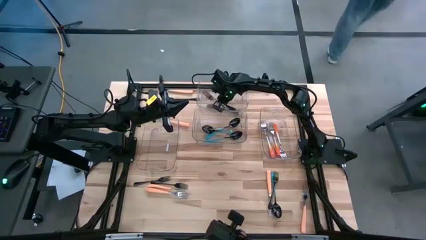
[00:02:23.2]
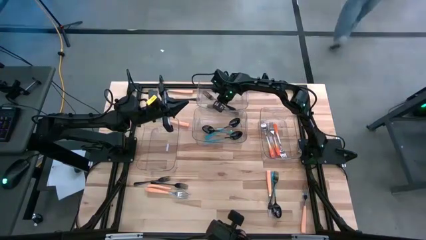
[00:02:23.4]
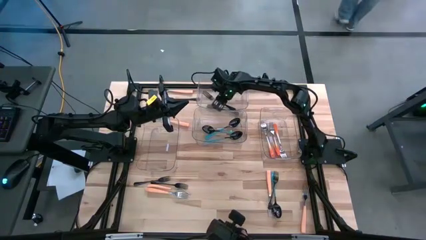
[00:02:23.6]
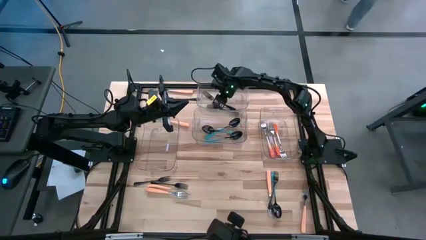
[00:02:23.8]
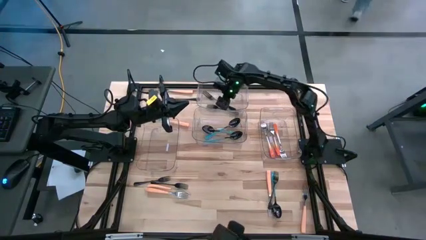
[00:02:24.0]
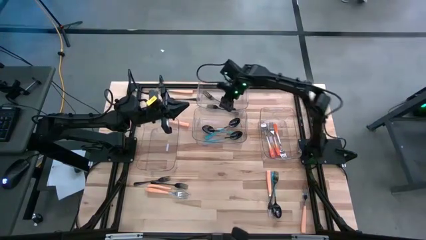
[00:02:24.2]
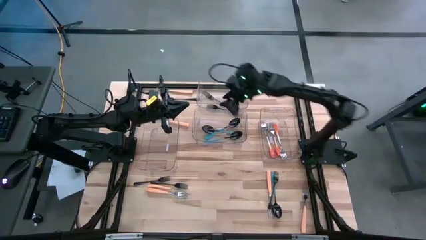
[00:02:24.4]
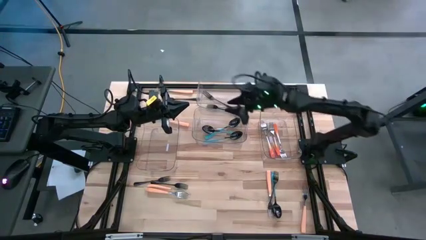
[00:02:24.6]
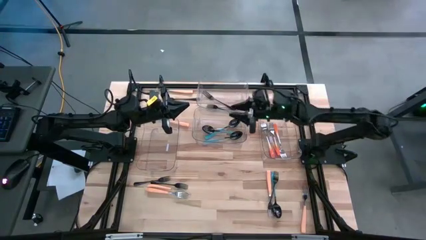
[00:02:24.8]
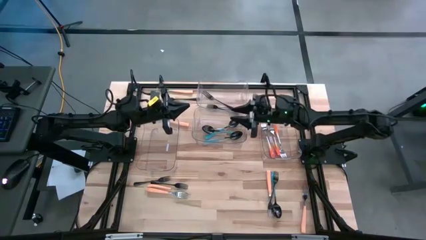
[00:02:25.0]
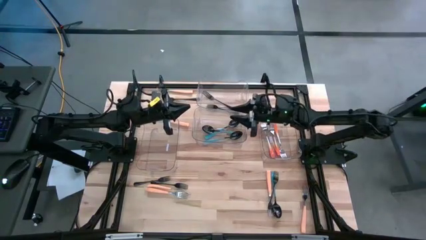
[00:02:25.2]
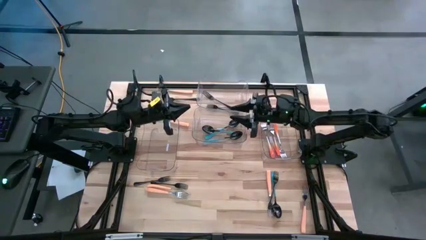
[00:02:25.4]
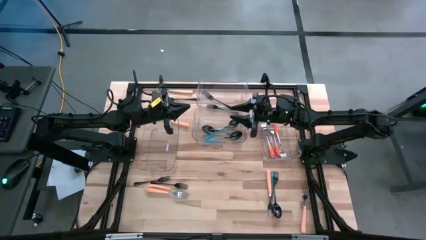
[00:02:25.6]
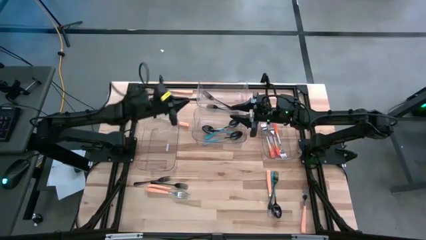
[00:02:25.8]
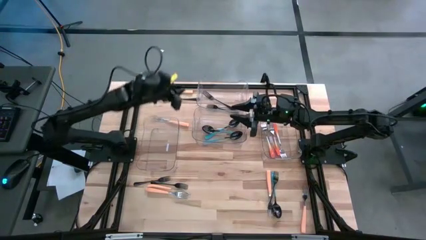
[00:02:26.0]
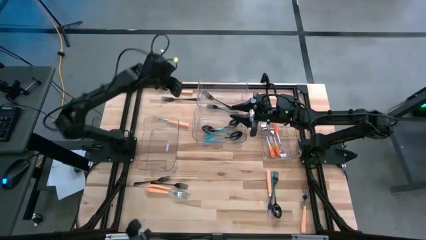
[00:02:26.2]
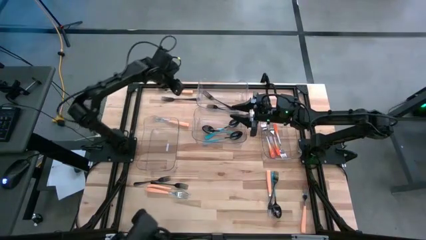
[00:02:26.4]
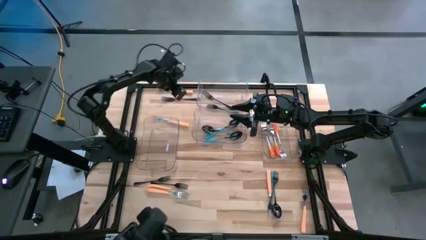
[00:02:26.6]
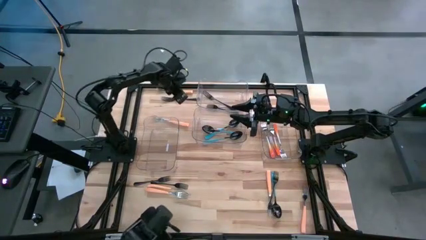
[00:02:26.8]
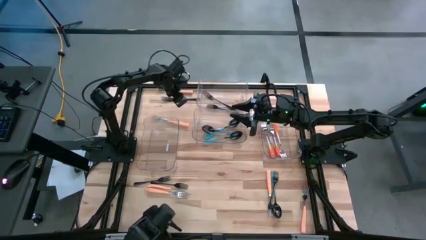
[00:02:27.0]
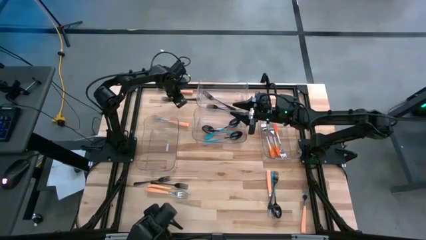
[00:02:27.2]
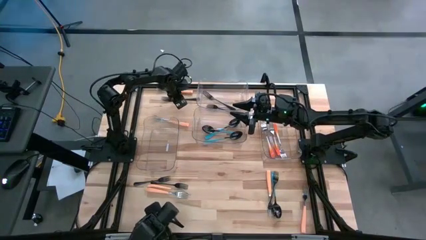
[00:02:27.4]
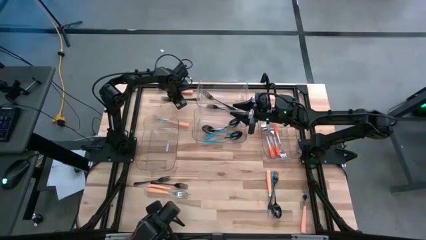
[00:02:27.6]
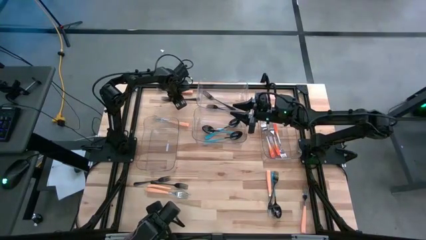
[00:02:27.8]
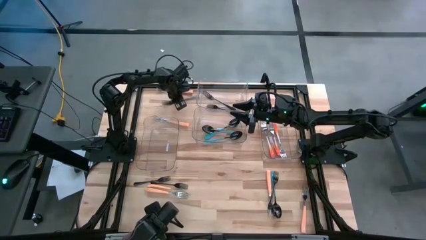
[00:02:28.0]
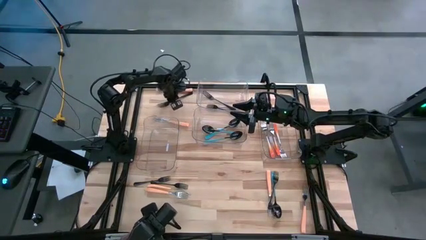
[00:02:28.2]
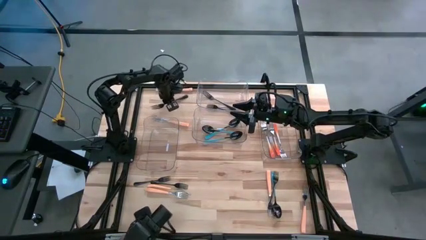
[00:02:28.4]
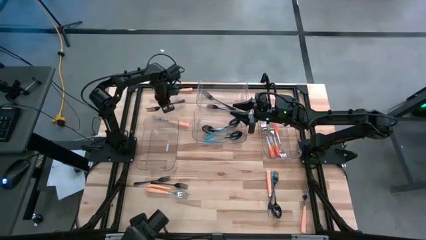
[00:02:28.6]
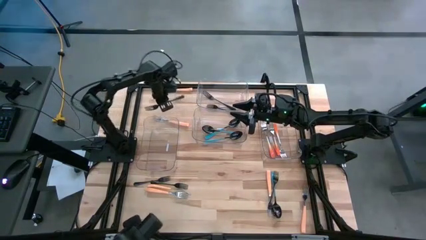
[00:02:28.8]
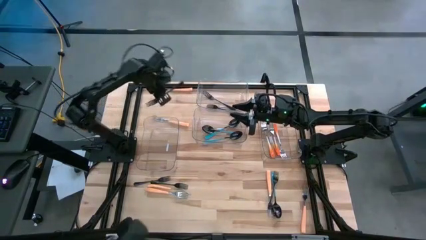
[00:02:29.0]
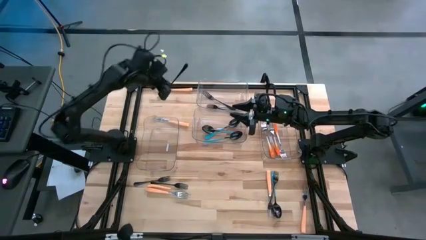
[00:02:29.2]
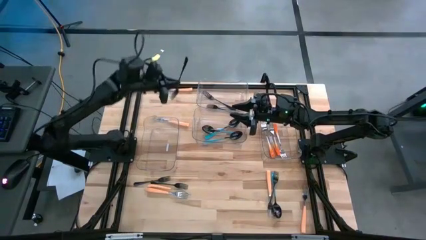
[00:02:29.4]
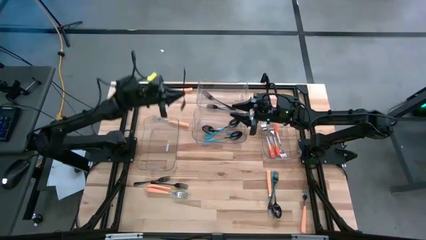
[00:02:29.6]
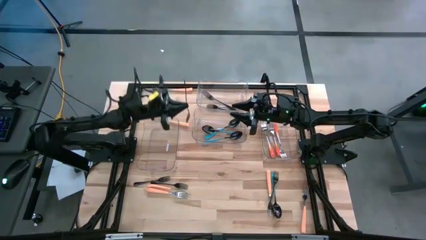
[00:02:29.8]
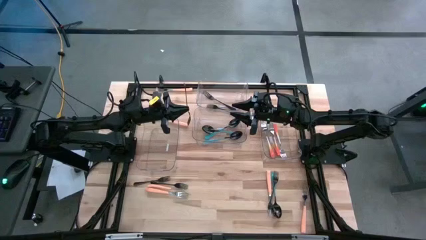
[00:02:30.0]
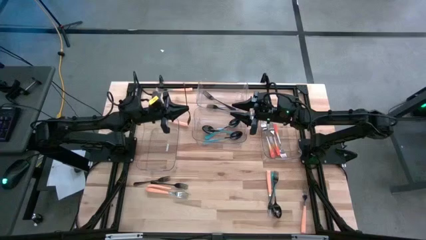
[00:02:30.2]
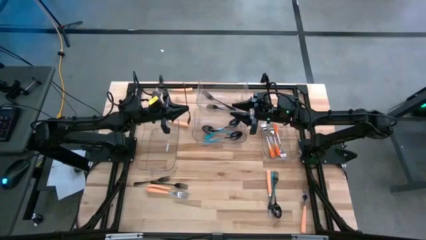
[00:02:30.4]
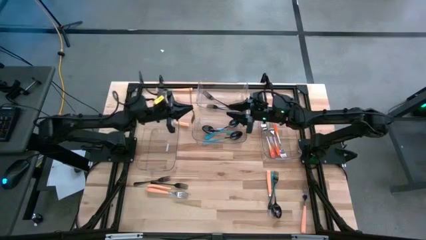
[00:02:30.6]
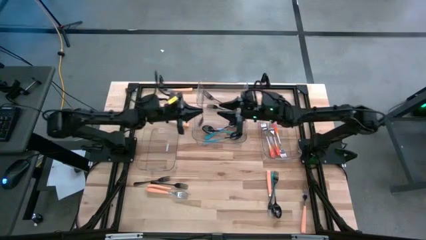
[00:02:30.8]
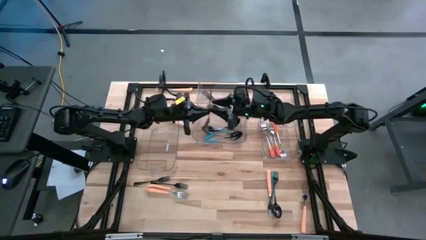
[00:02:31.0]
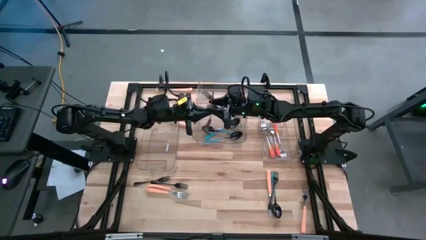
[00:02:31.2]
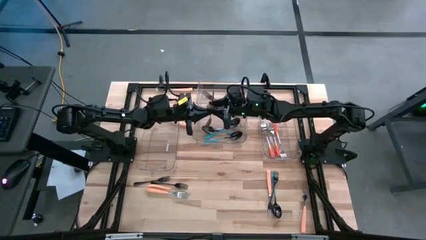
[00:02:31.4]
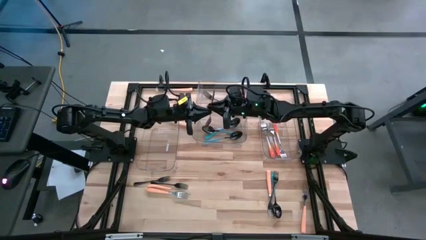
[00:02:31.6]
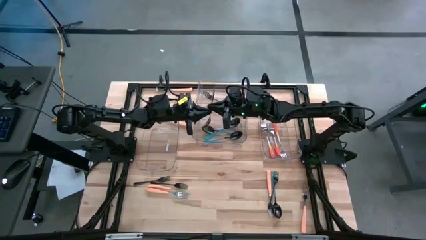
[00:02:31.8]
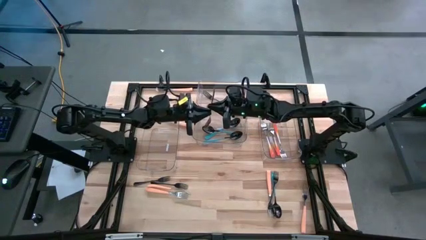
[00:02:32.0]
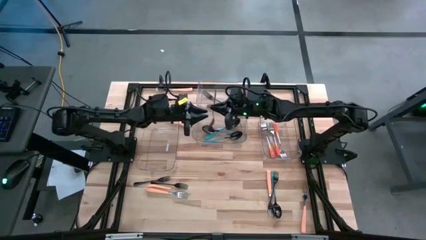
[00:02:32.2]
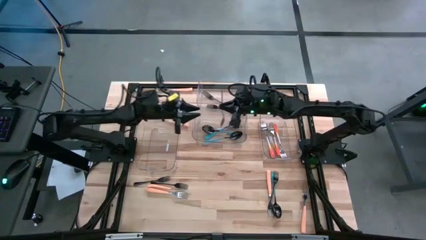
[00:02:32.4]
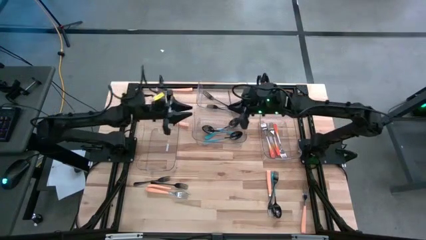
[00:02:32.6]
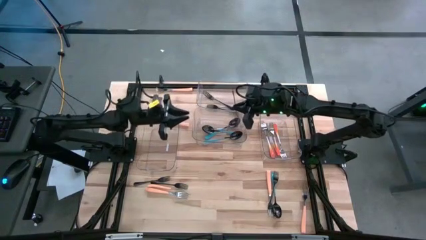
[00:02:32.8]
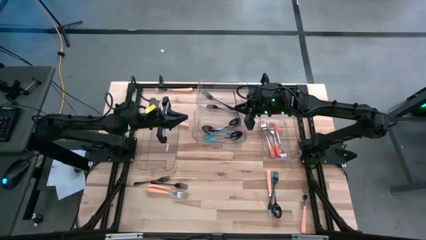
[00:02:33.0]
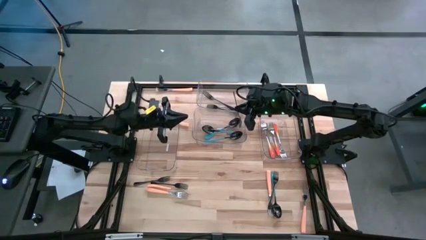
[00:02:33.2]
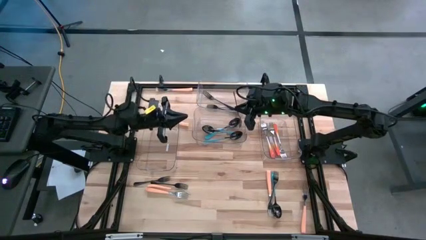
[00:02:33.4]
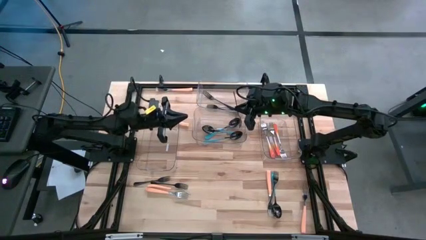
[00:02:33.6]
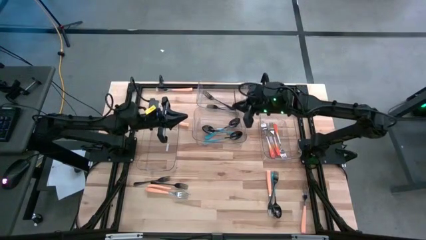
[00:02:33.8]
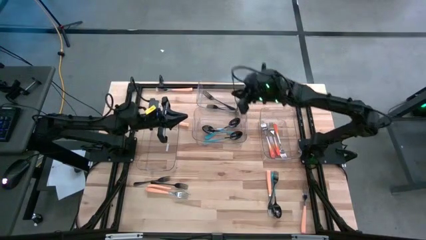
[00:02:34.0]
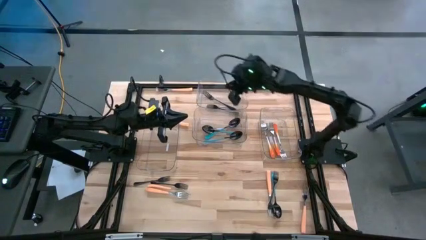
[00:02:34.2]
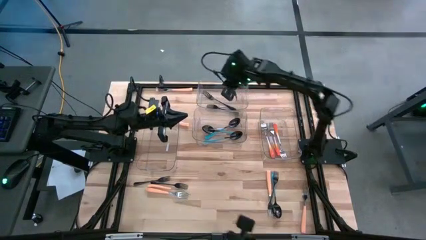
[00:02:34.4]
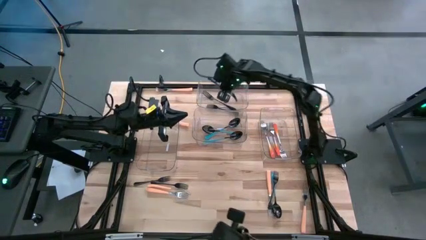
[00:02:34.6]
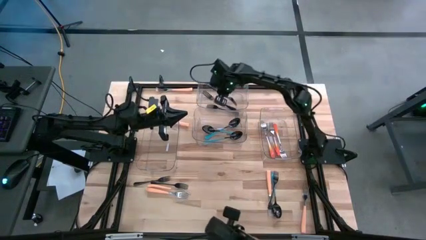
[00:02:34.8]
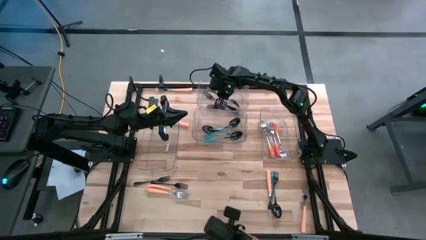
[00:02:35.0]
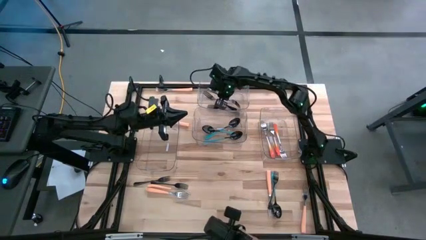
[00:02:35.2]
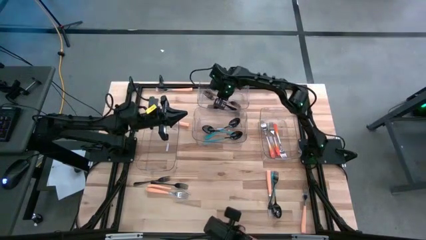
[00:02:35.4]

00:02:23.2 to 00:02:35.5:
Task: Sort silverware by color (type)
Put the black fork into the top transparent bin
